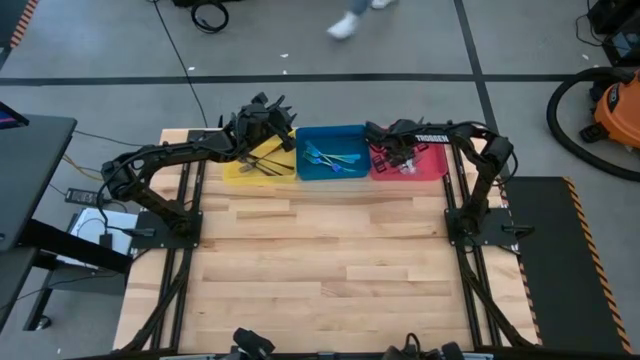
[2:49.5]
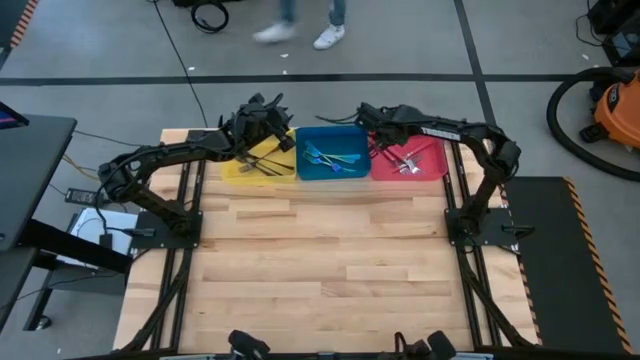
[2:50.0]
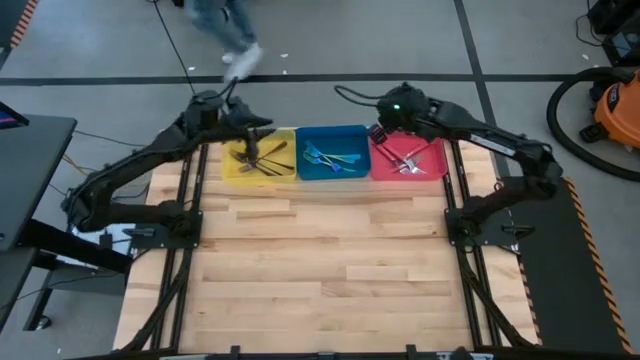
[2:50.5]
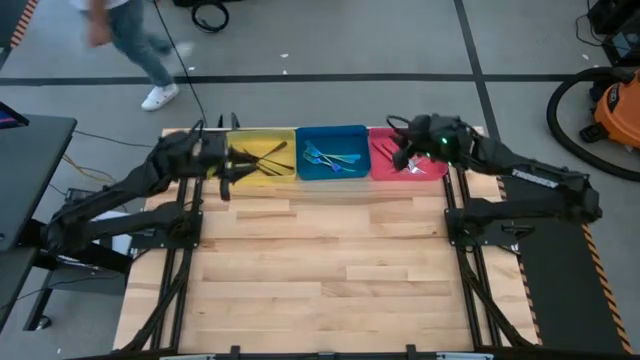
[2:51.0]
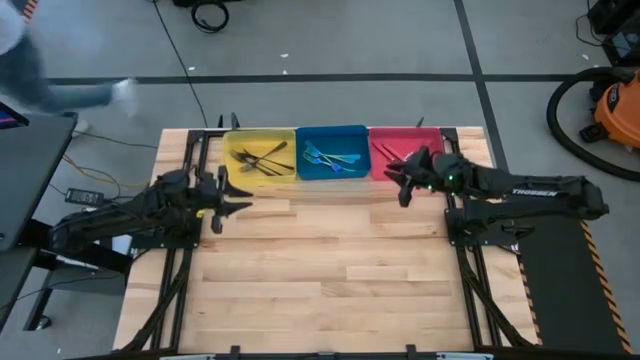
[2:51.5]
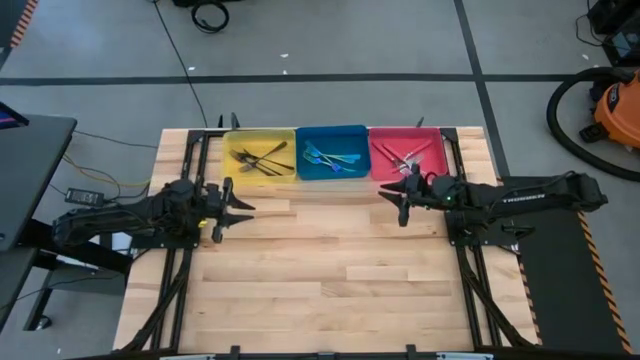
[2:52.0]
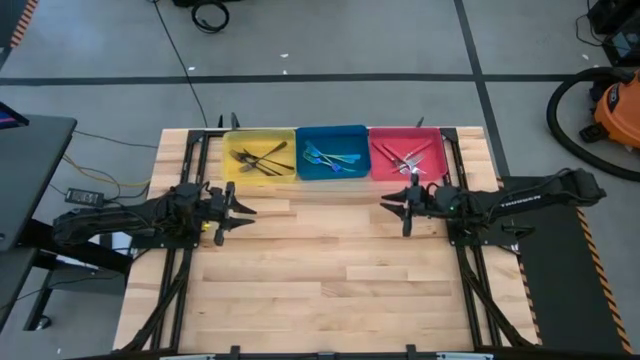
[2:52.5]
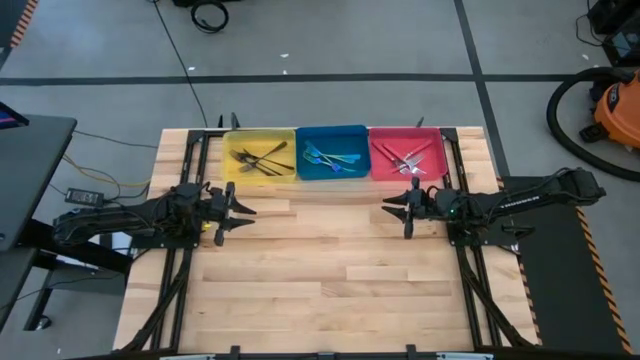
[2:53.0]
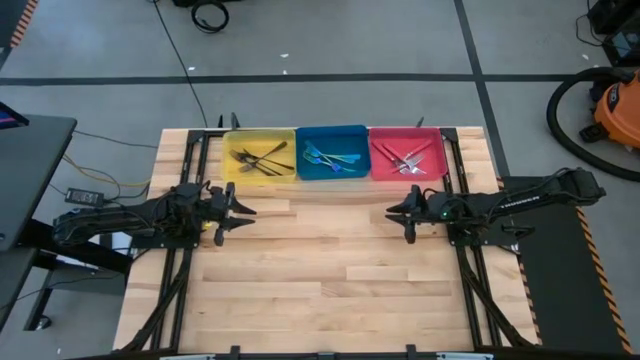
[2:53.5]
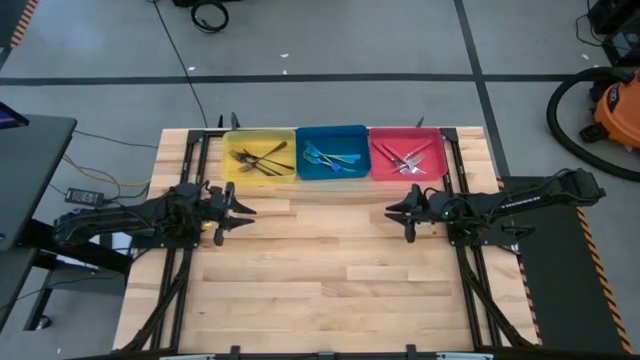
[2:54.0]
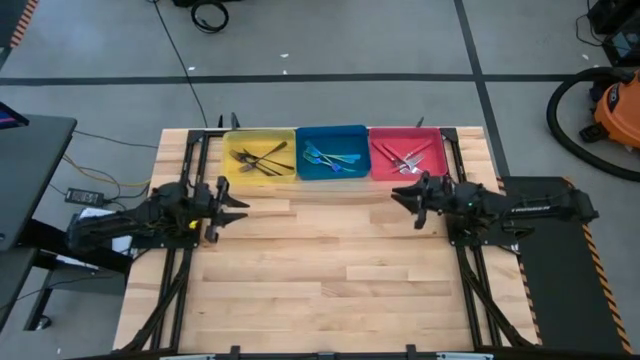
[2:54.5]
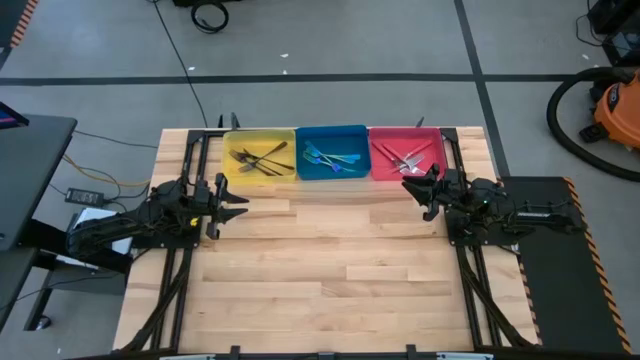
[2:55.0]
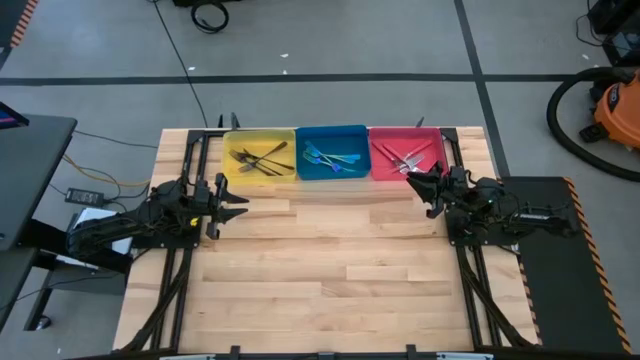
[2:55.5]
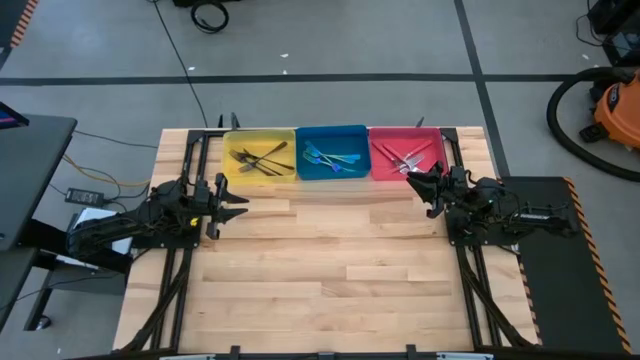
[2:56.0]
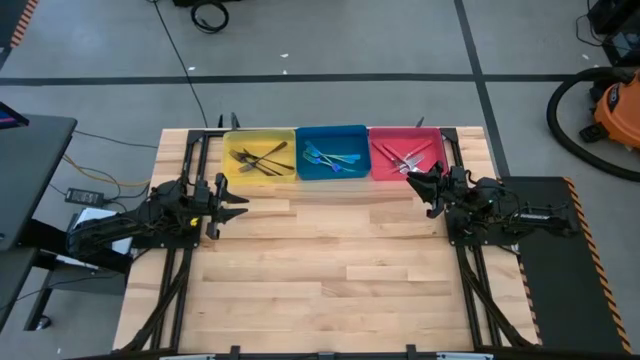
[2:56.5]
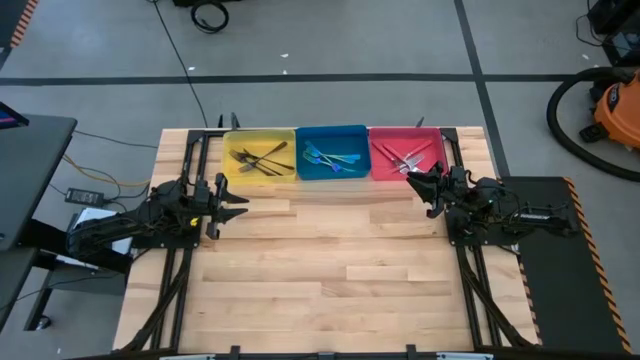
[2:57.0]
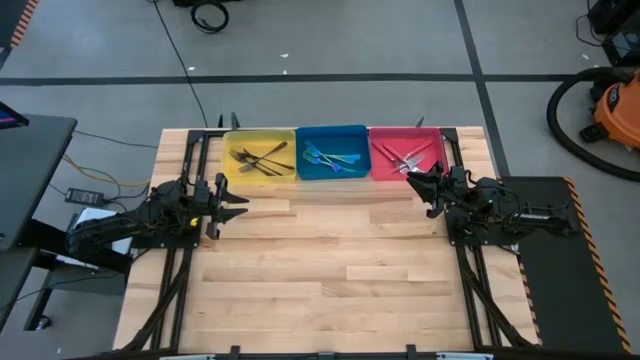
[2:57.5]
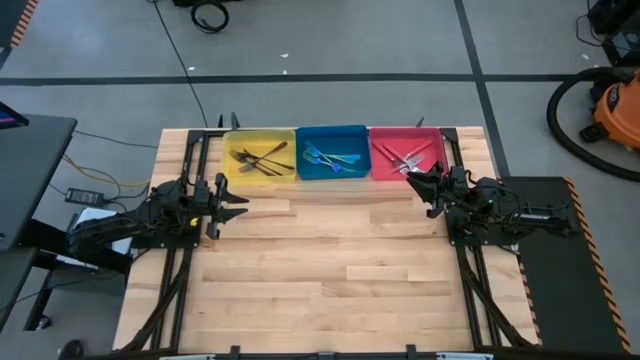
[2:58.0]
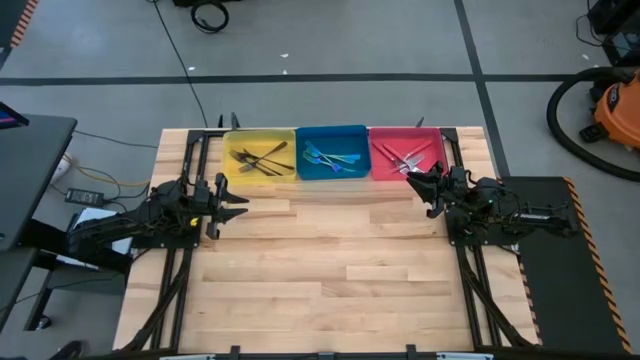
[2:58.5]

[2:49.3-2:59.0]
Task: Sort silverware by color (type)
Return to Home Position

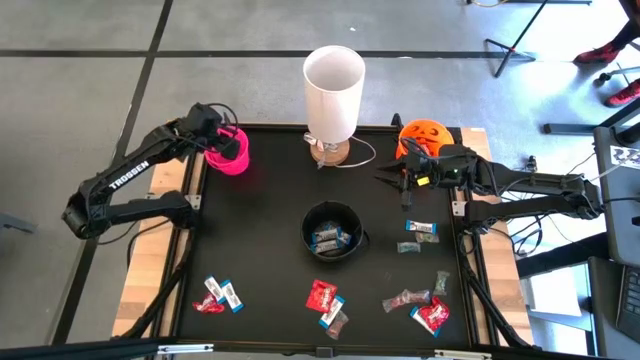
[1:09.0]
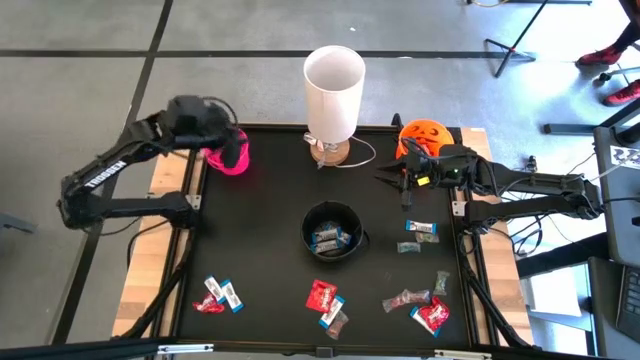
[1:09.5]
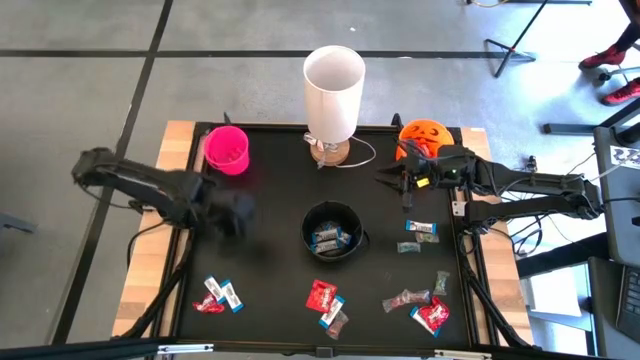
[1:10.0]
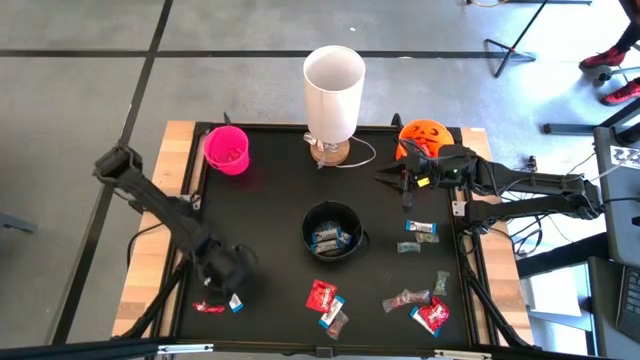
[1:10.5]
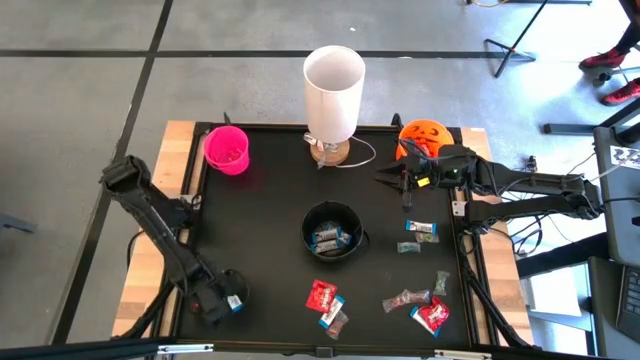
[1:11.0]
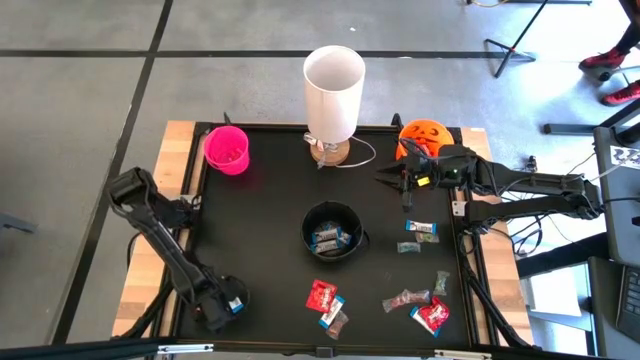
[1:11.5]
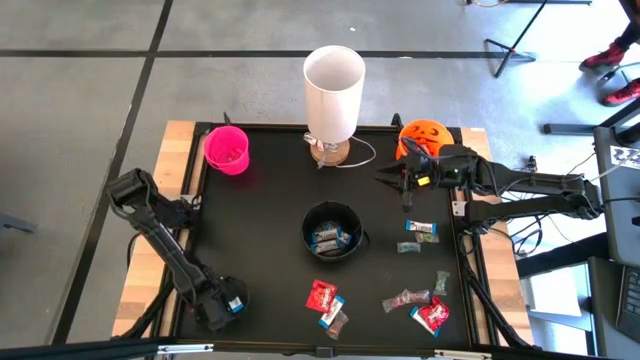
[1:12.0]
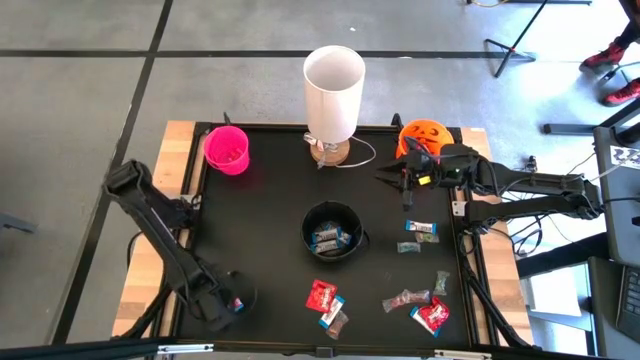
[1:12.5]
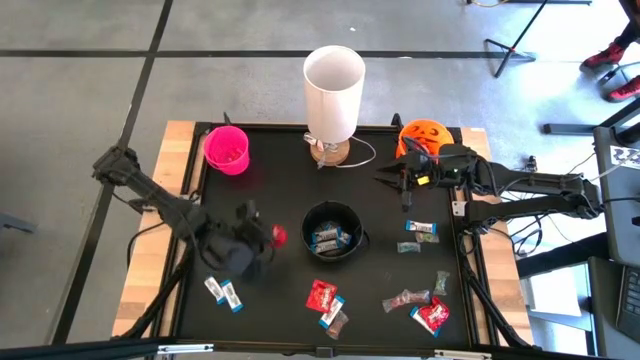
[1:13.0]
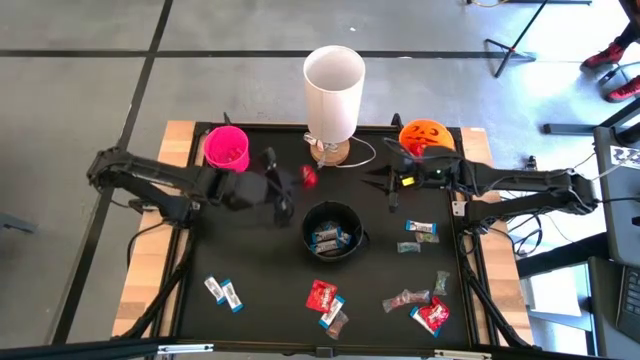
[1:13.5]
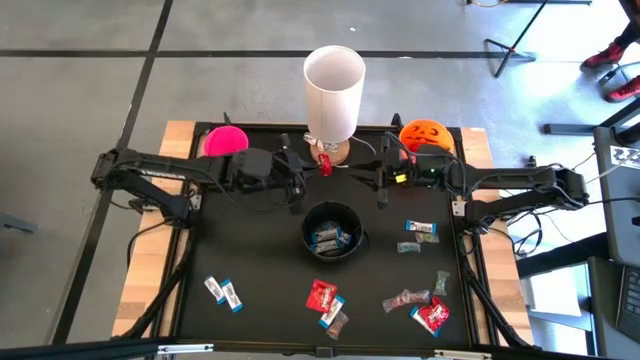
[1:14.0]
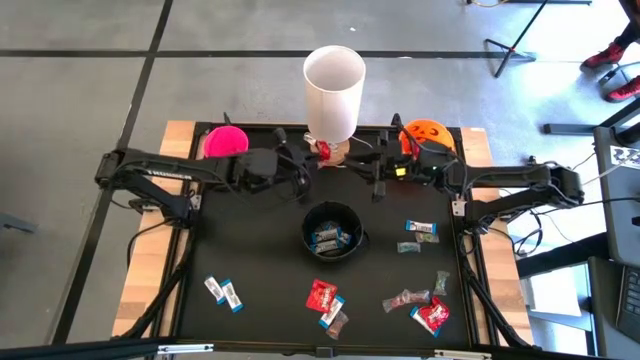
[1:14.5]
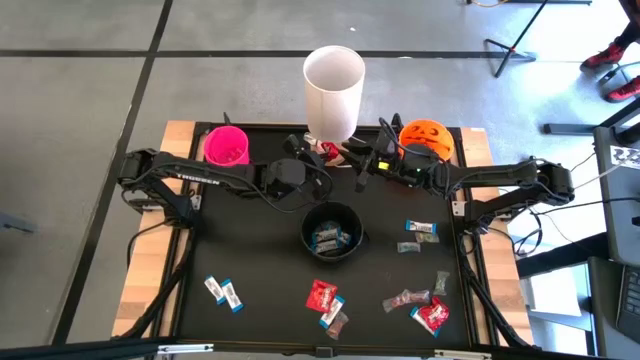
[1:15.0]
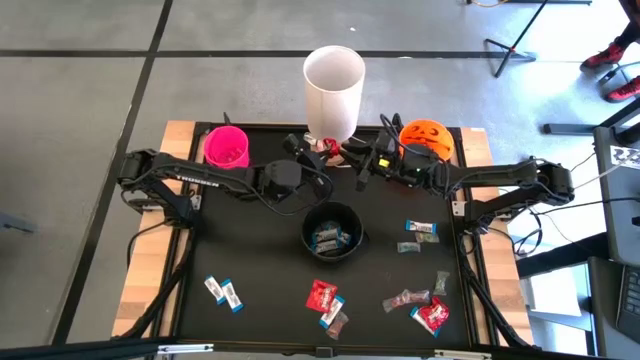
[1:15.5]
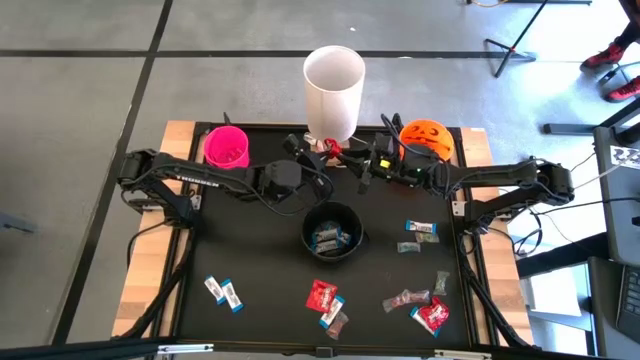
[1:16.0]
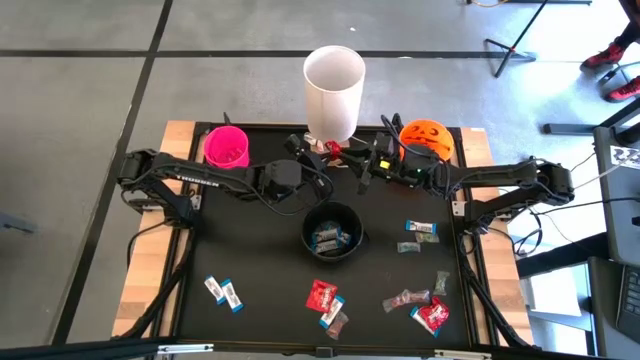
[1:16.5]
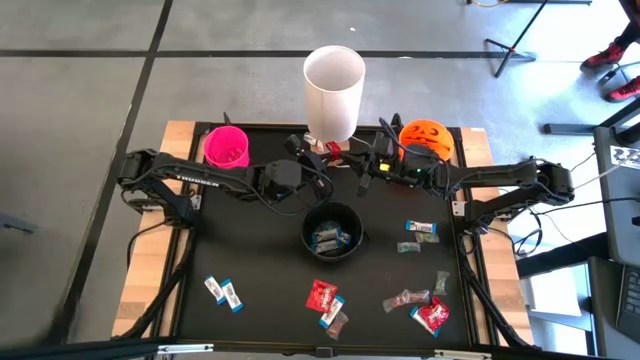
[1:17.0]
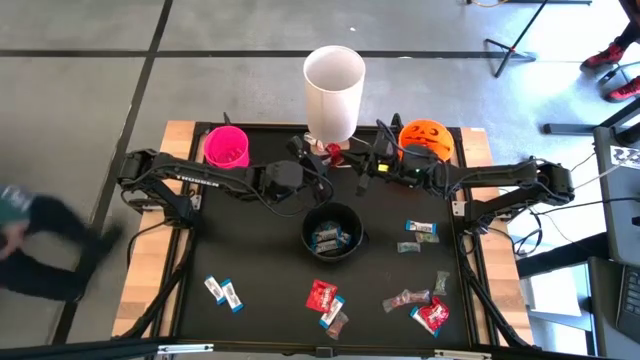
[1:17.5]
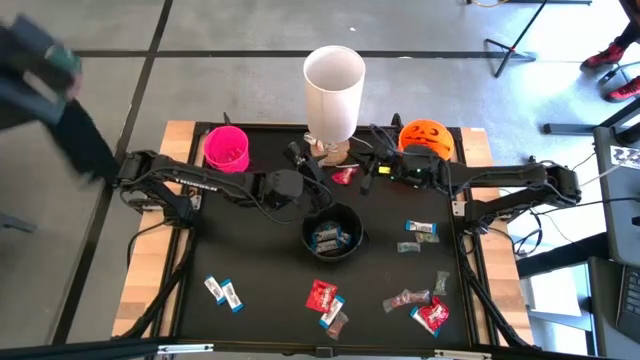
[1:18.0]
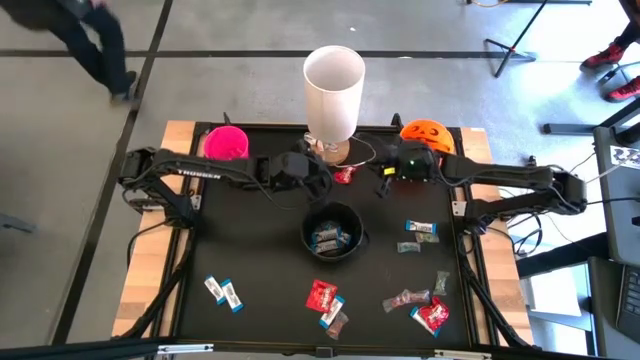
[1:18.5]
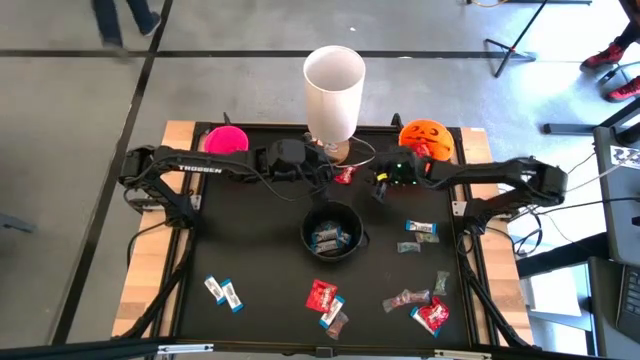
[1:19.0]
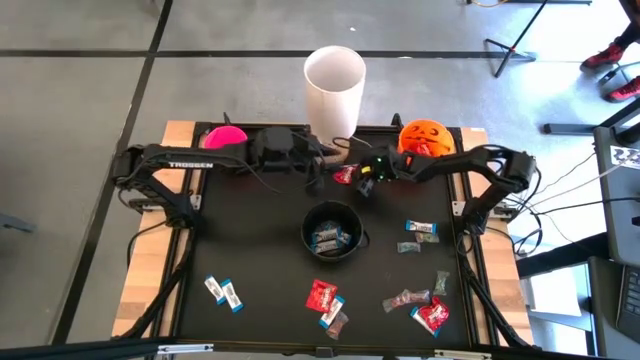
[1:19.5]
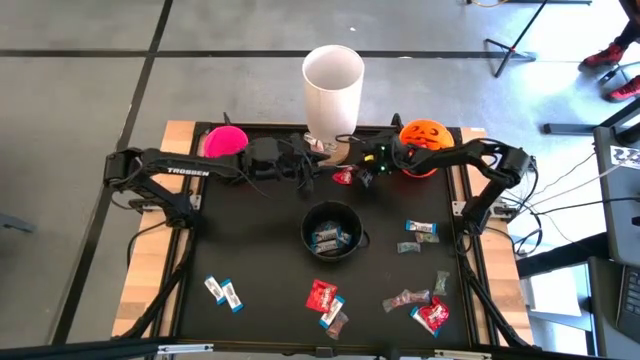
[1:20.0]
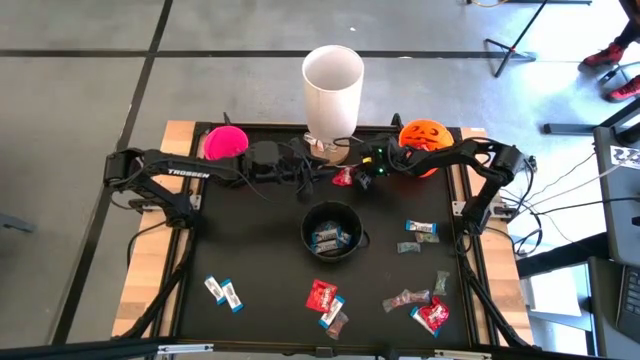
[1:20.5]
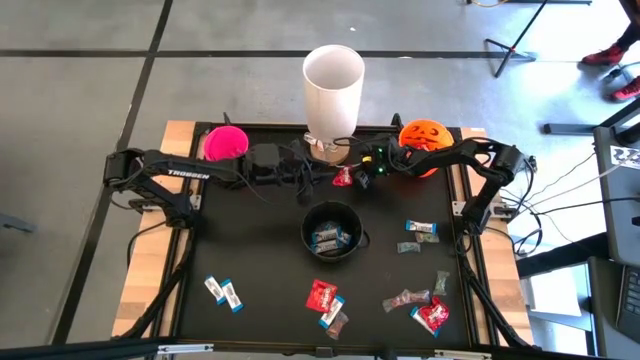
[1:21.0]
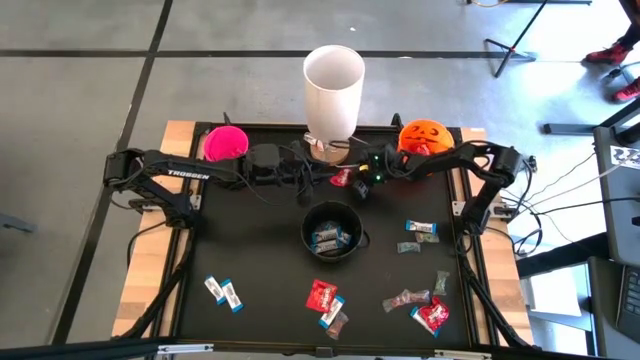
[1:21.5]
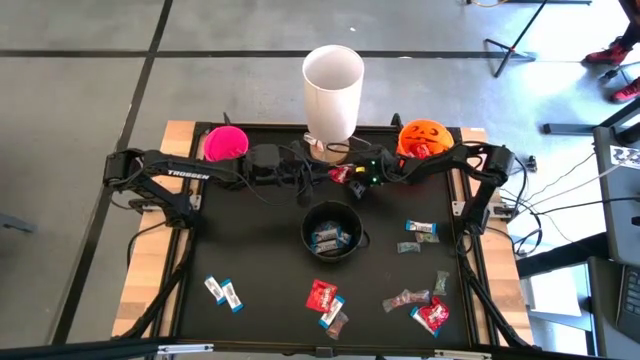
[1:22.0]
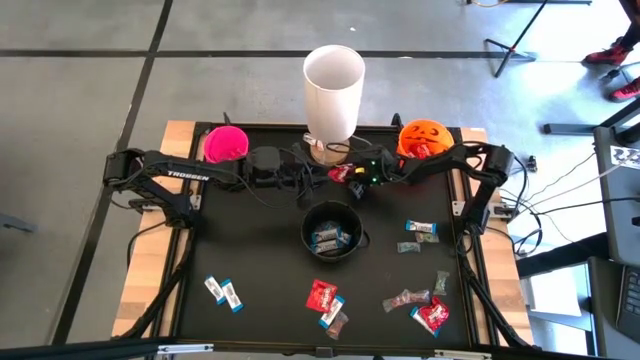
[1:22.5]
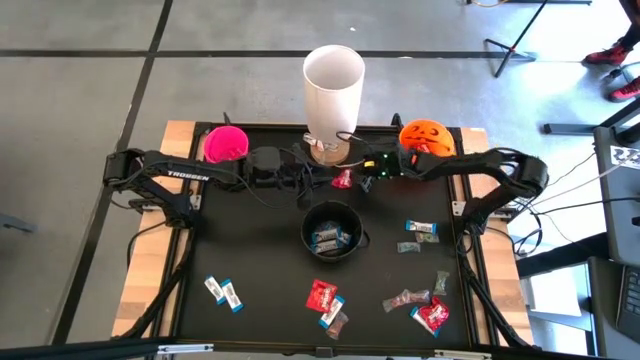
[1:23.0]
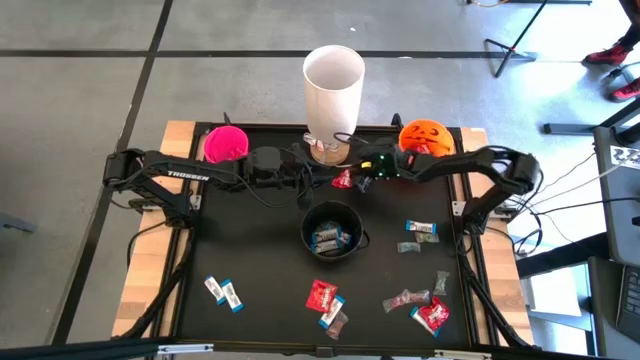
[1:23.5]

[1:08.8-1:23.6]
Task: Sort candy
Put the red candy pack into the orange bucket
